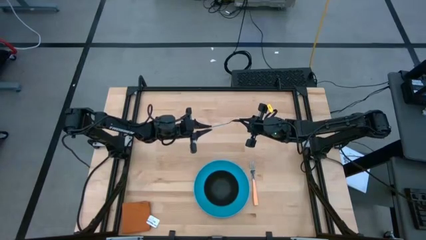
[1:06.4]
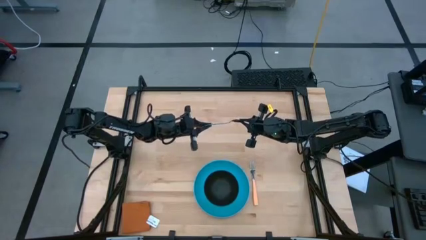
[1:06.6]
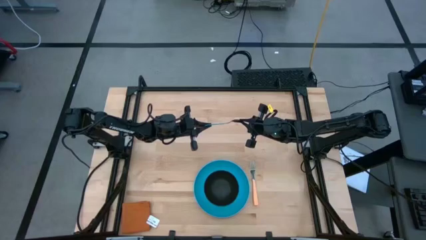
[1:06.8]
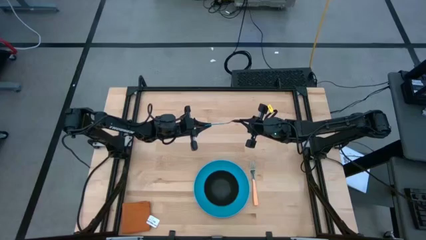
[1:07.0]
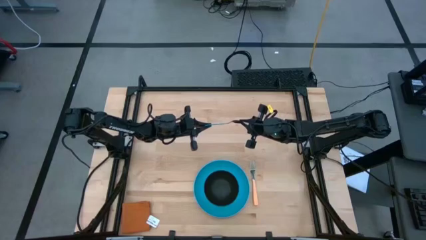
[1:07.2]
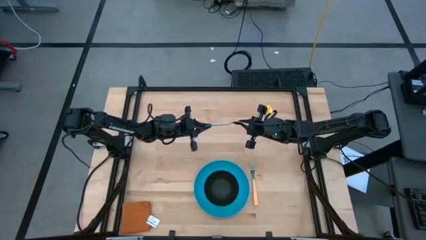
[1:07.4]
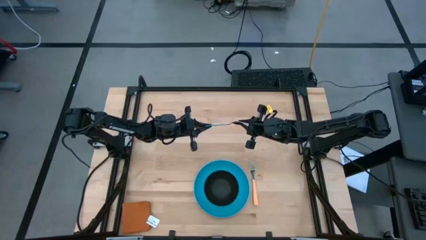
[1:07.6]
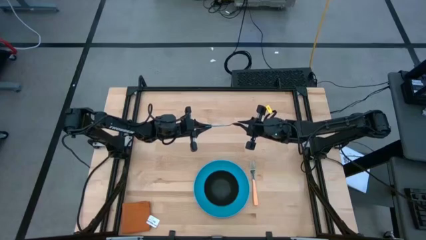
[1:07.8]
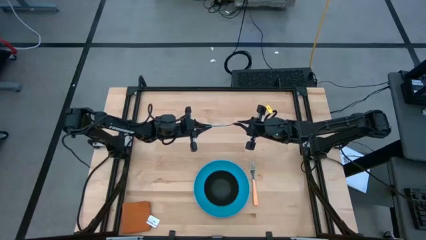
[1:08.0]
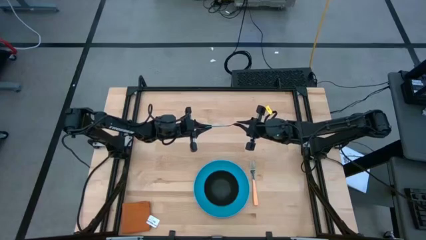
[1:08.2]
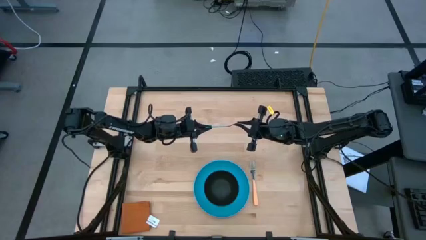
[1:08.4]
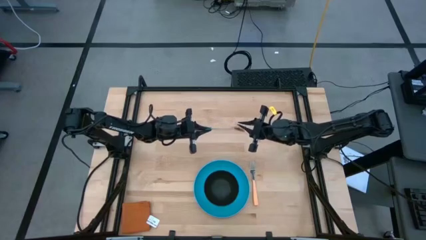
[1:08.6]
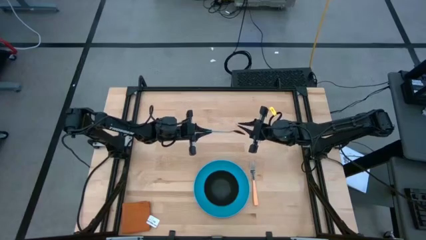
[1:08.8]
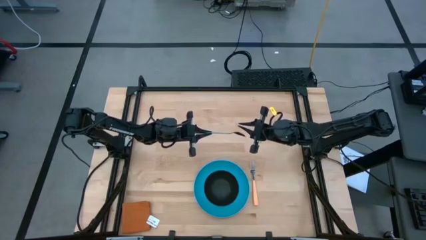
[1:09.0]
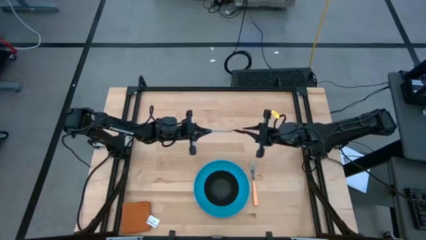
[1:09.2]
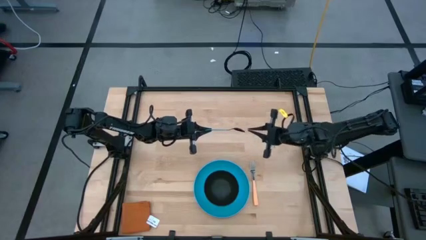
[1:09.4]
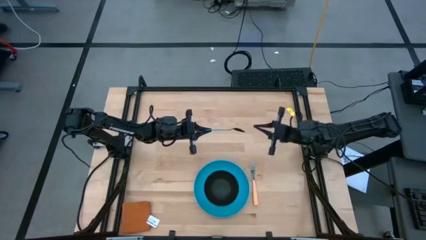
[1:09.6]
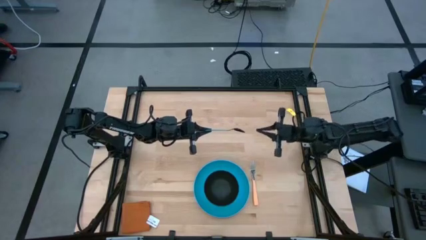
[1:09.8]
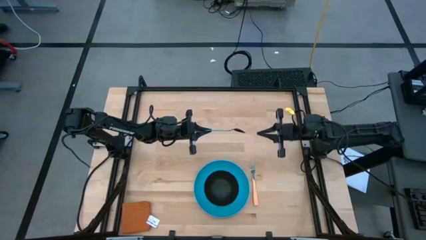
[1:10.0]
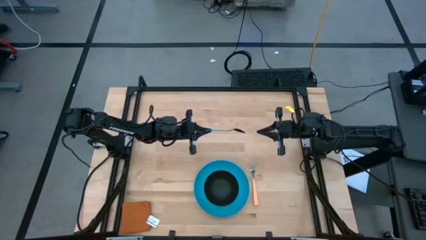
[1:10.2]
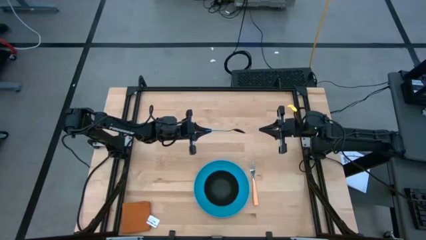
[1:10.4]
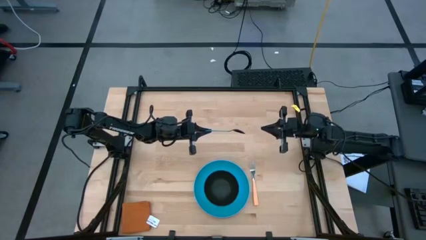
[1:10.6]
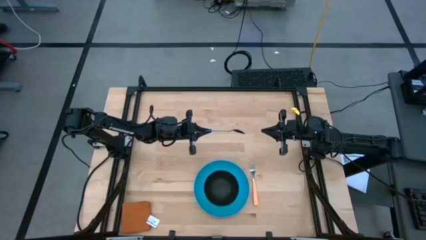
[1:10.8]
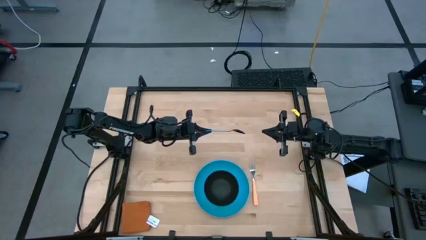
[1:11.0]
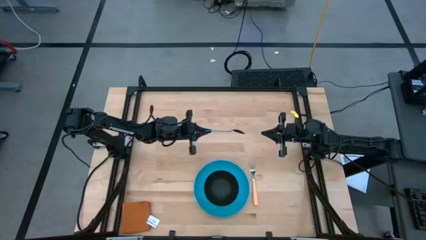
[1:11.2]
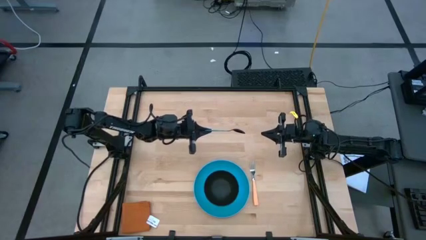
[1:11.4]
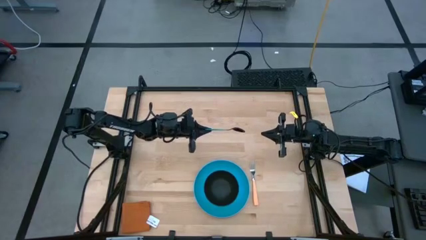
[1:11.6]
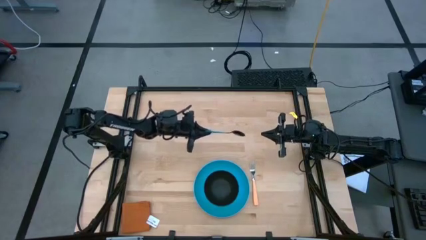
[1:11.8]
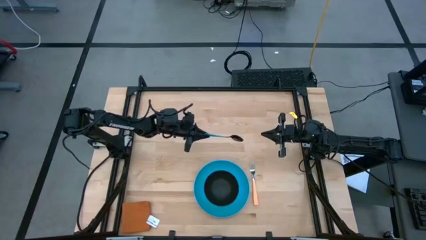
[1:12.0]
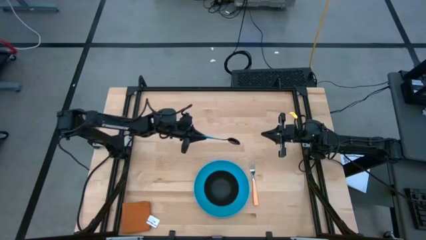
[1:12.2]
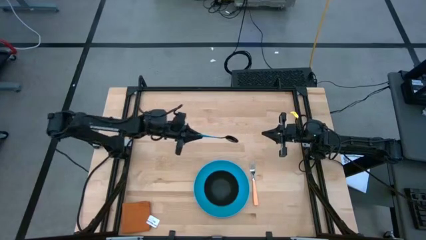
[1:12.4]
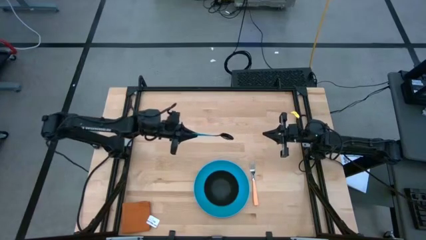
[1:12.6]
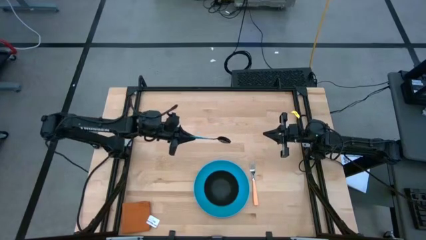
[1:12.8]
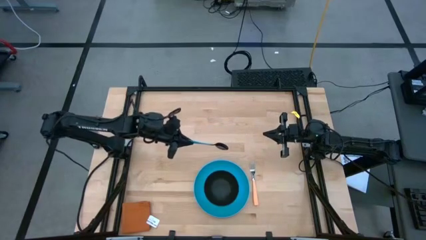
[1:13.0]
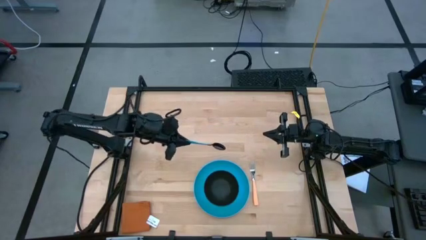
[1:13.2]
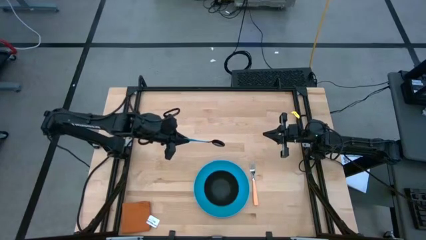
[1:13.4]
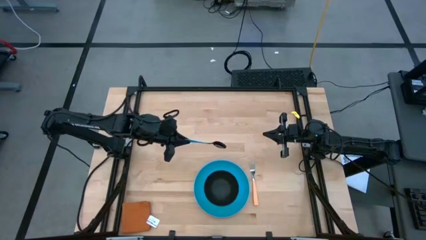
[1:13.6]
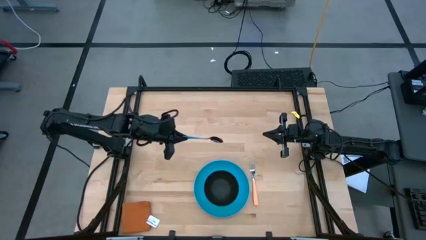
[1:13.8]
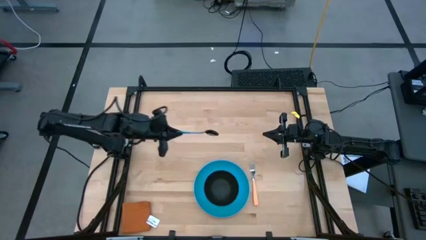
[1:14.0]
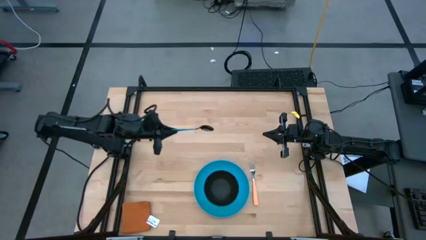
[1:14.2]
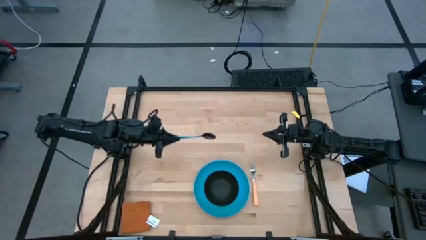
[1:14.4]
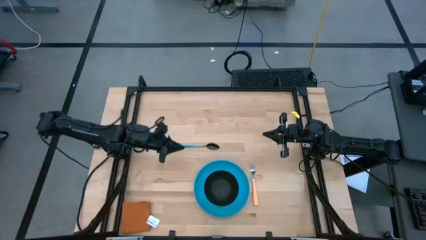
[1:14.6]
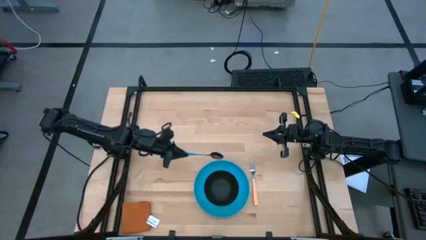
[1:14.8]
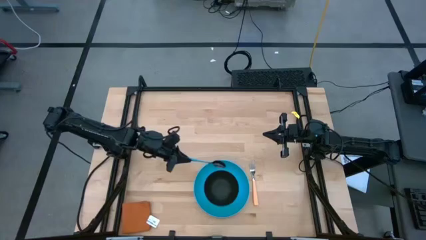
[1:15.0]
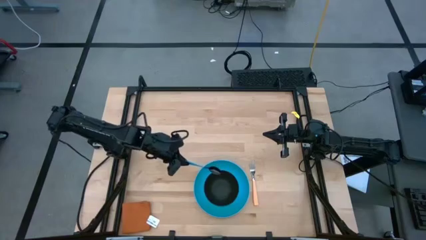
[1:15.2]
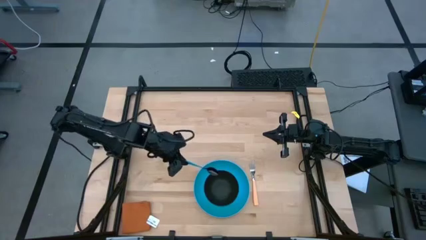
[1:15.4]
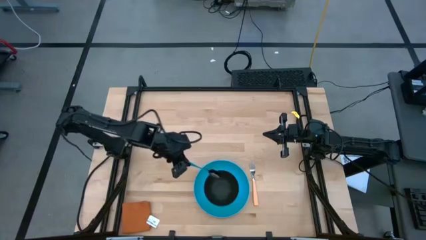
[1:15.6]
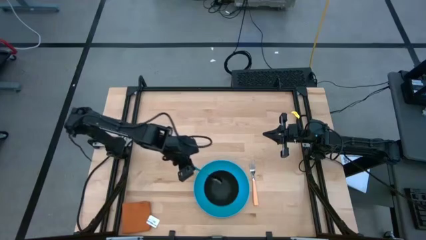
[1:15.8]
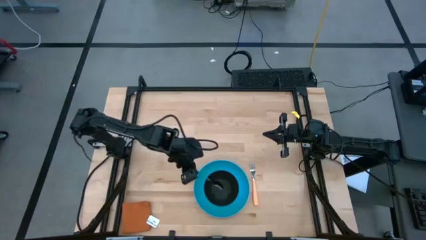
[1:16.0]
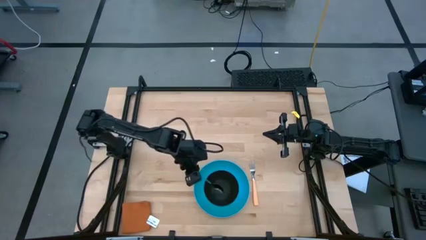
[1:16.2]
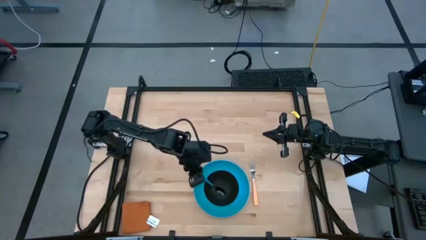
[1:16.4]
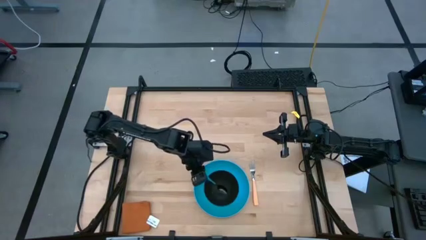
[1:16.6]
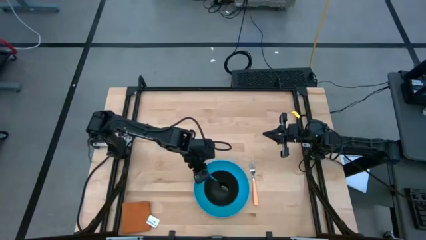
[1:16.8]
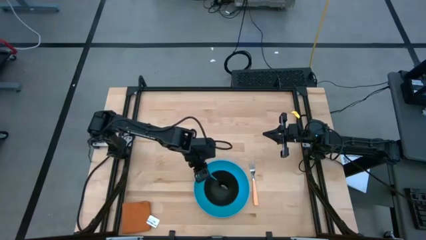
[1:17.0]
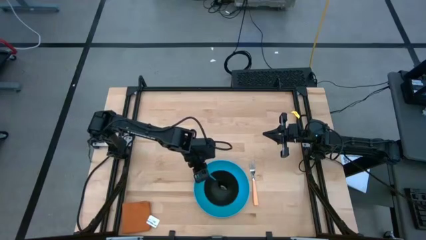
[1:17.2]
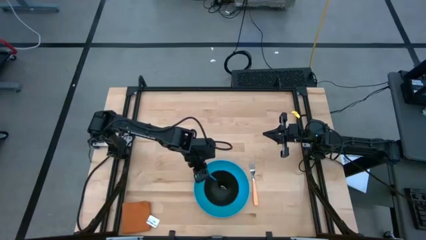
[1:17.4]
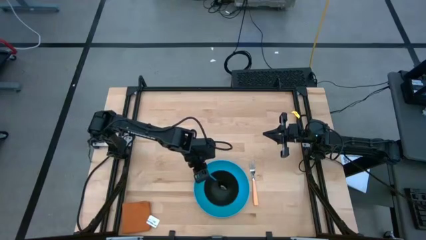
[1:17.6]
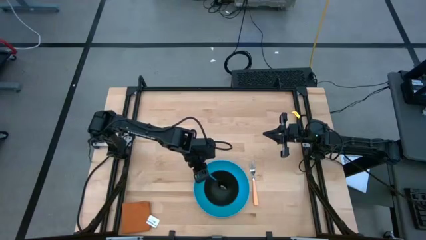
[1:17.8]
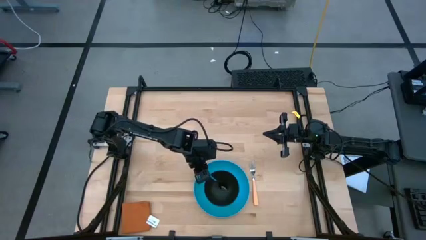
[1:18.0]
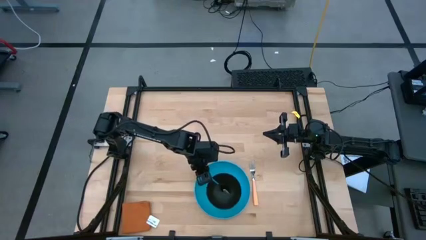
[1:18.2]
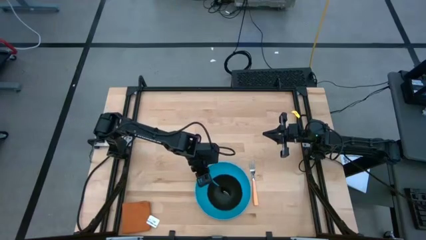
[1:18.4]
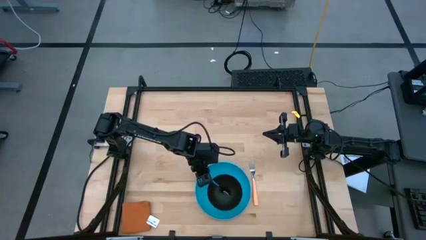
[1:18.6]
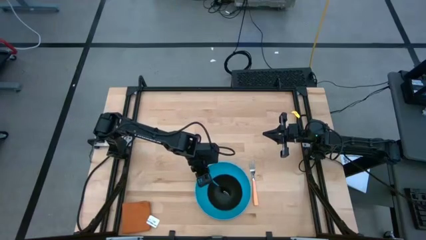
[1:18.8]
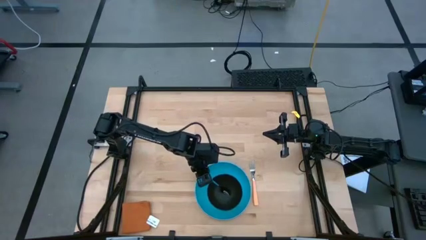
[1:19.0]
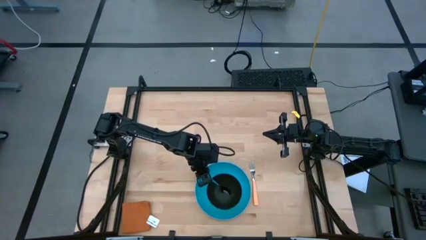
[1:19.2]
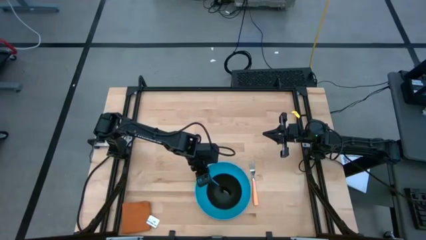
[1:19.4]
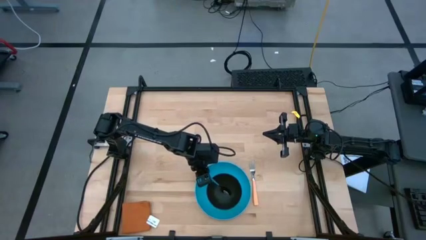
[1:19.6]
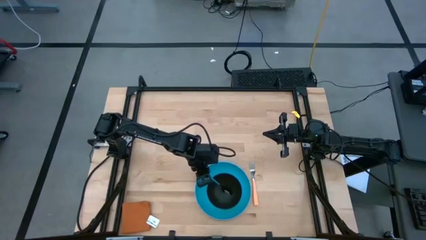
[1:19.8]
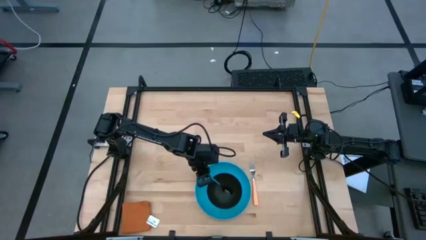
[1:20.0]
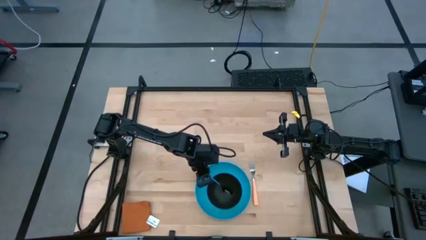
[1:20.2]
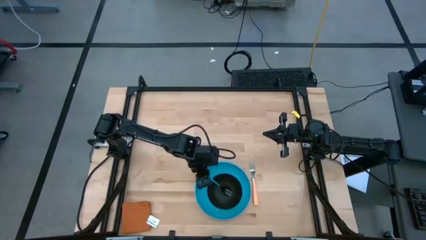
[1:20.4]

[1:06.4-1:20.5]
Task: Set table place
Put the blue spoon into the bowl
